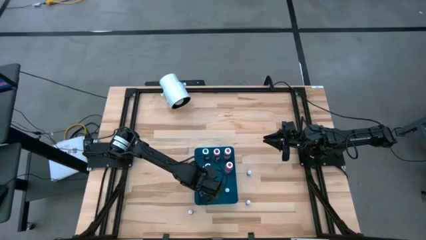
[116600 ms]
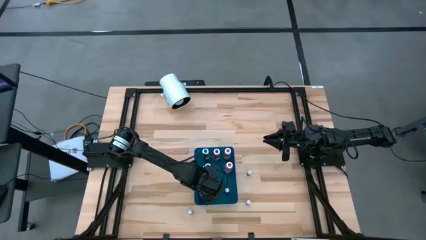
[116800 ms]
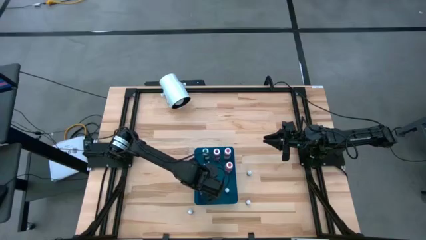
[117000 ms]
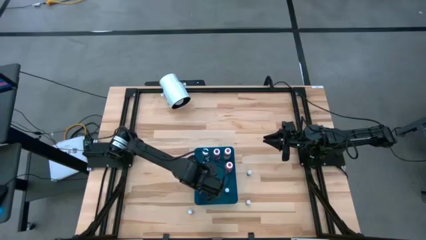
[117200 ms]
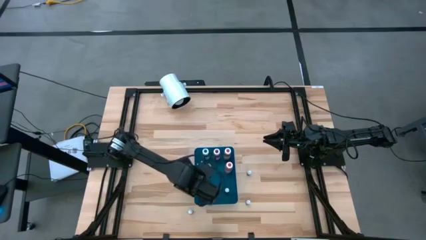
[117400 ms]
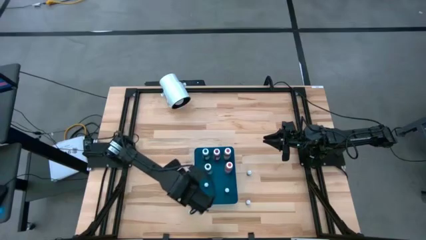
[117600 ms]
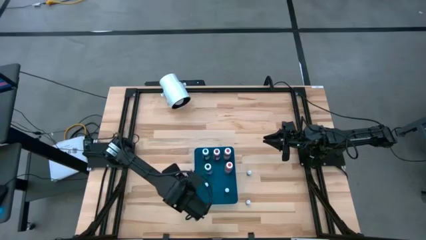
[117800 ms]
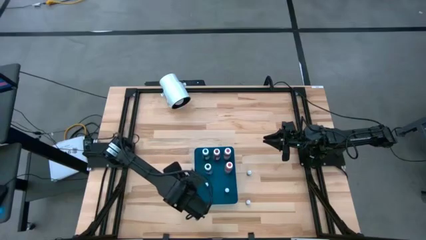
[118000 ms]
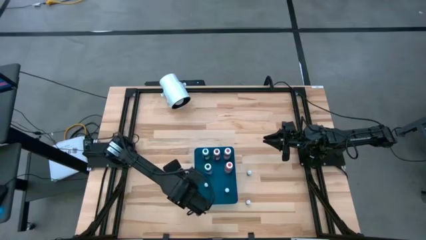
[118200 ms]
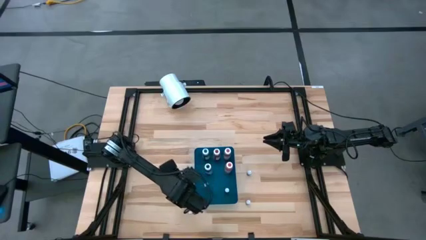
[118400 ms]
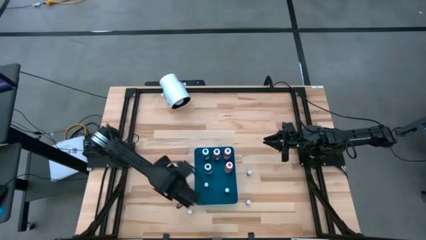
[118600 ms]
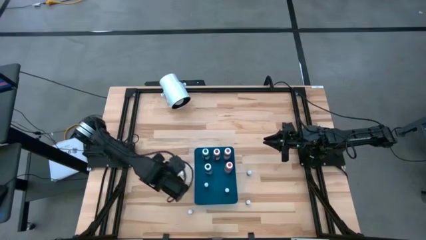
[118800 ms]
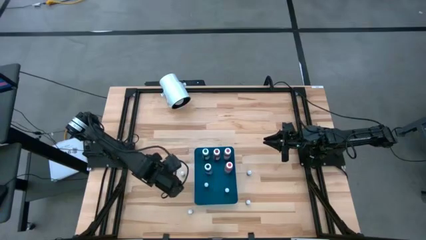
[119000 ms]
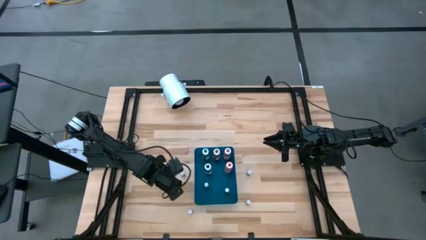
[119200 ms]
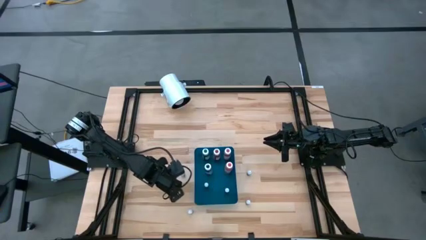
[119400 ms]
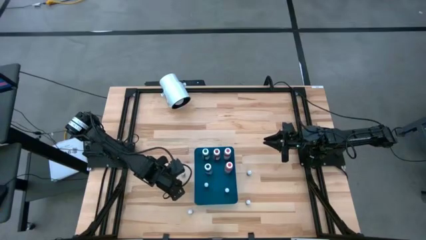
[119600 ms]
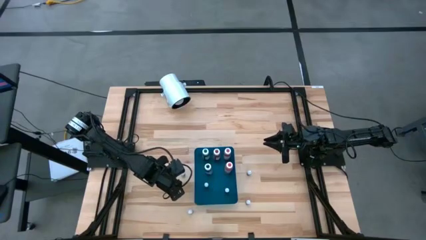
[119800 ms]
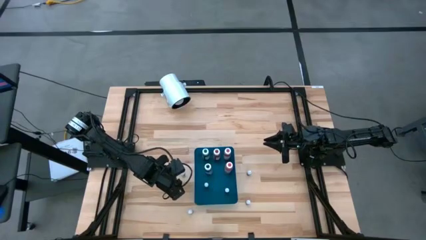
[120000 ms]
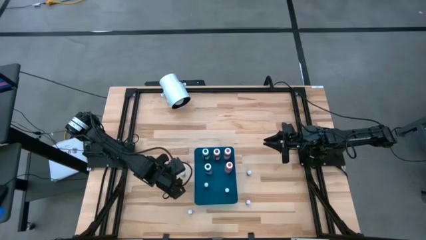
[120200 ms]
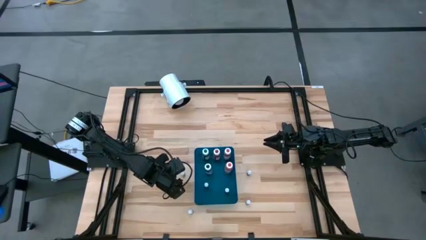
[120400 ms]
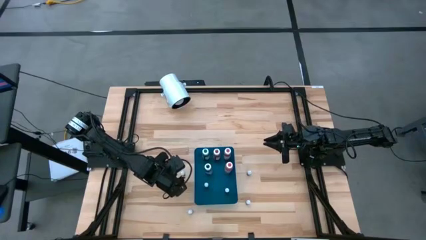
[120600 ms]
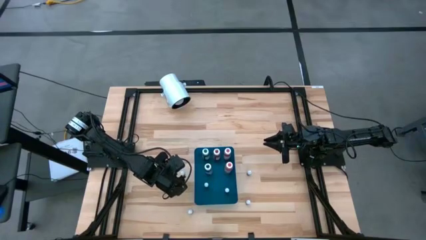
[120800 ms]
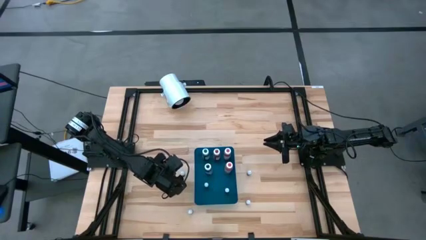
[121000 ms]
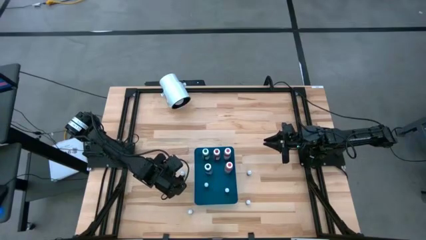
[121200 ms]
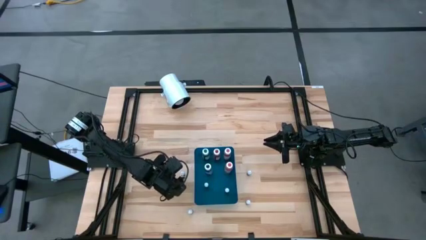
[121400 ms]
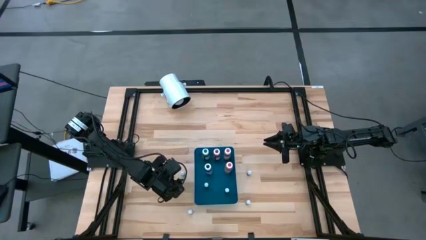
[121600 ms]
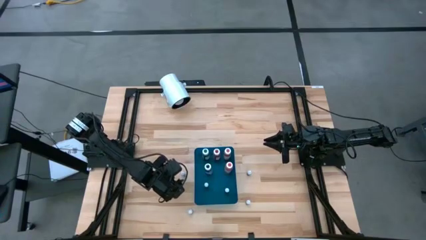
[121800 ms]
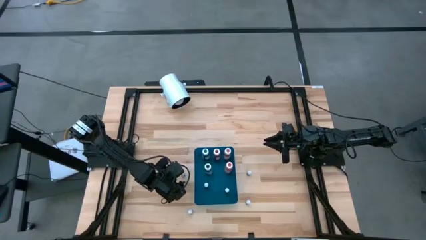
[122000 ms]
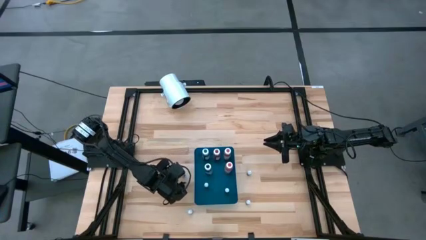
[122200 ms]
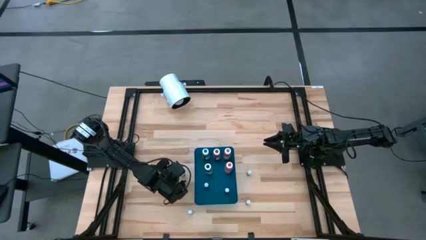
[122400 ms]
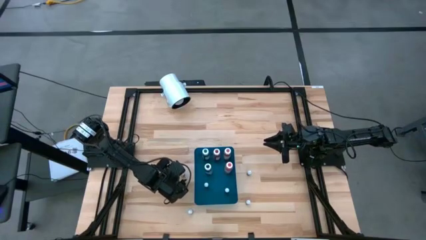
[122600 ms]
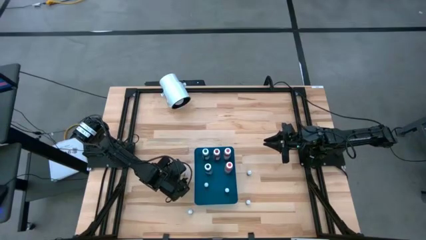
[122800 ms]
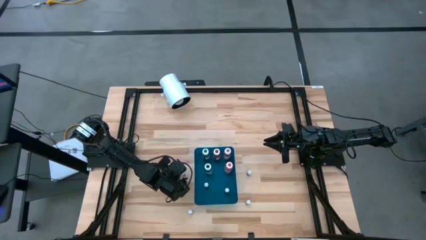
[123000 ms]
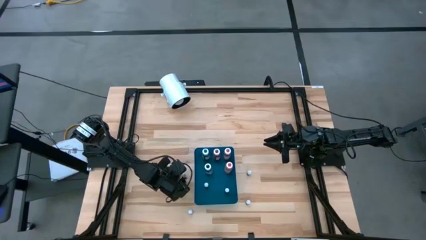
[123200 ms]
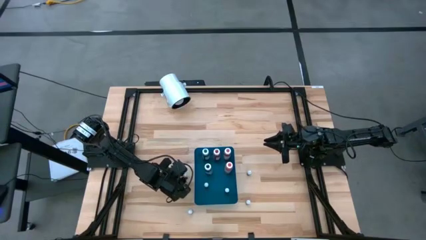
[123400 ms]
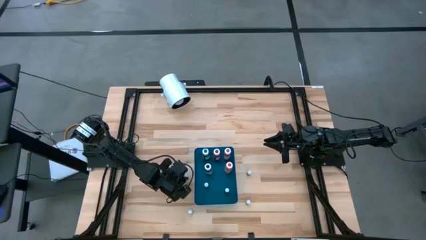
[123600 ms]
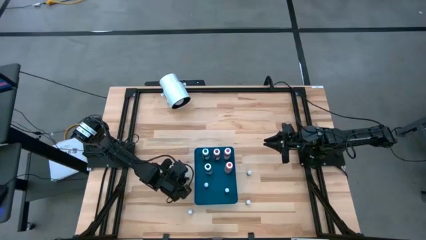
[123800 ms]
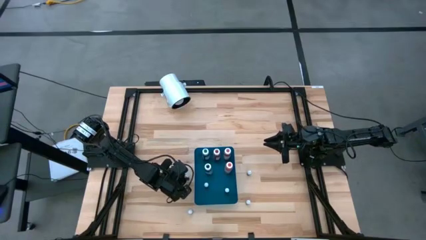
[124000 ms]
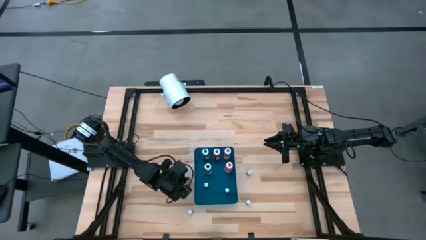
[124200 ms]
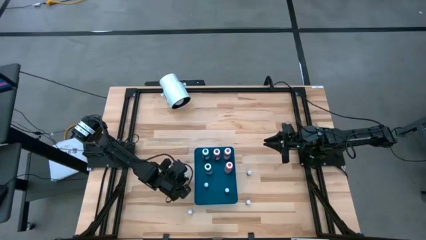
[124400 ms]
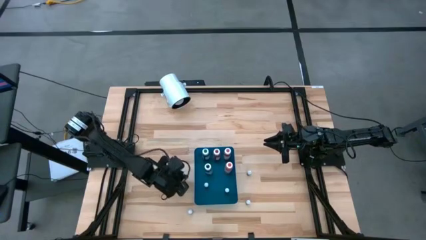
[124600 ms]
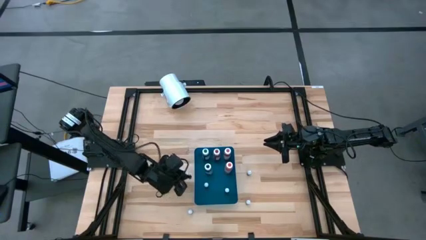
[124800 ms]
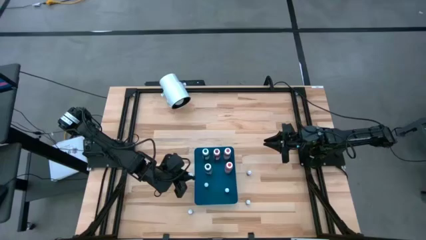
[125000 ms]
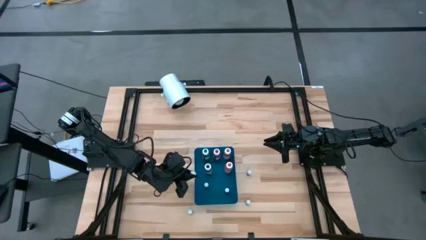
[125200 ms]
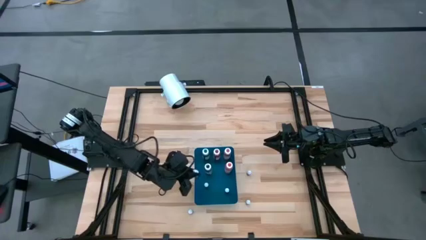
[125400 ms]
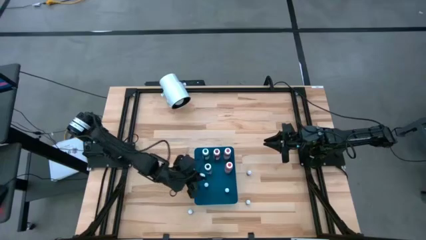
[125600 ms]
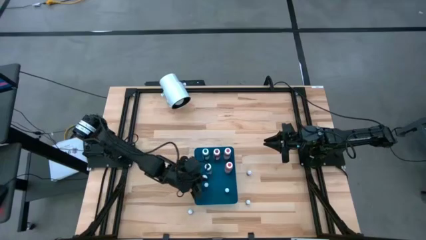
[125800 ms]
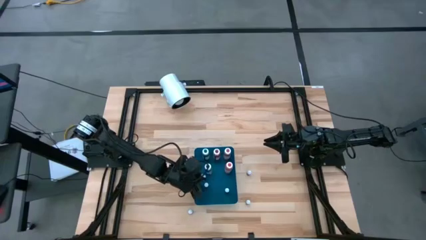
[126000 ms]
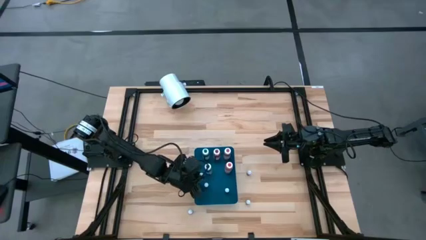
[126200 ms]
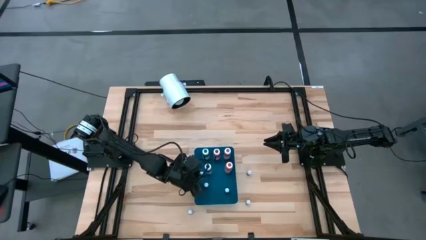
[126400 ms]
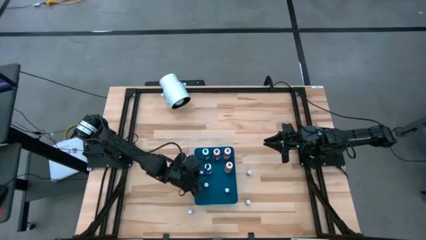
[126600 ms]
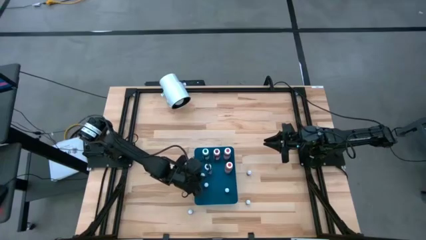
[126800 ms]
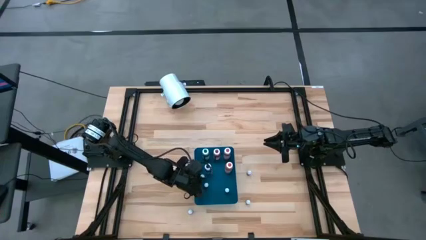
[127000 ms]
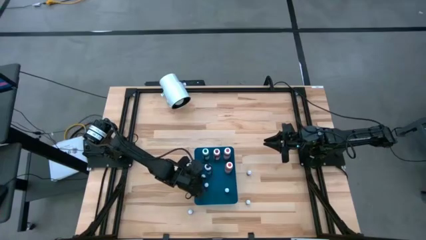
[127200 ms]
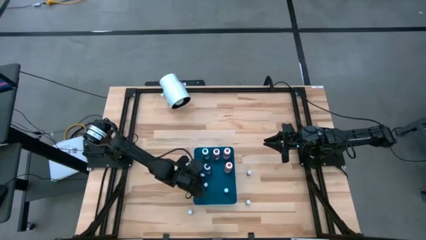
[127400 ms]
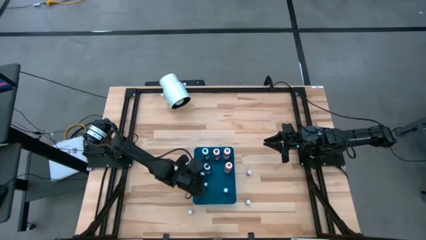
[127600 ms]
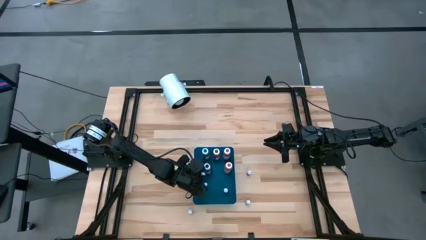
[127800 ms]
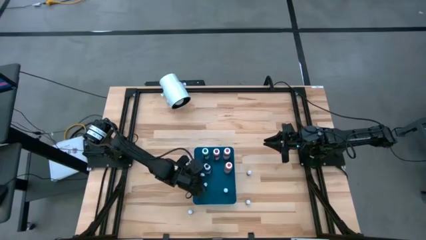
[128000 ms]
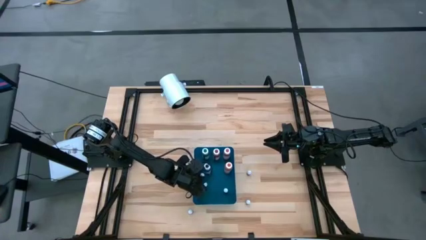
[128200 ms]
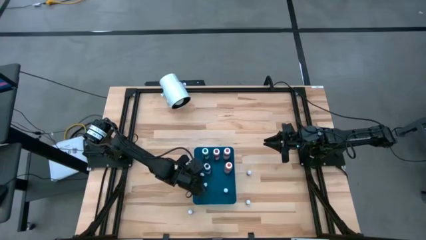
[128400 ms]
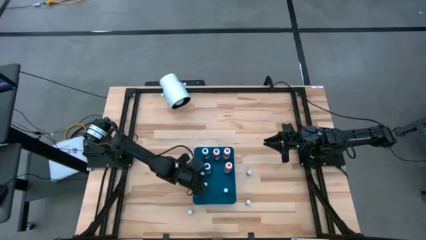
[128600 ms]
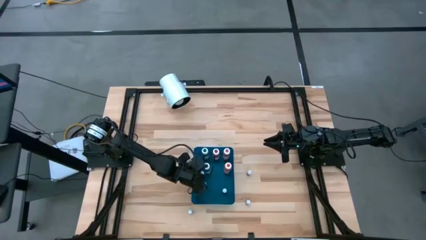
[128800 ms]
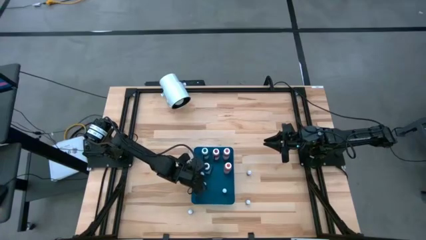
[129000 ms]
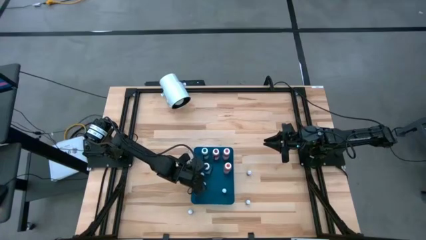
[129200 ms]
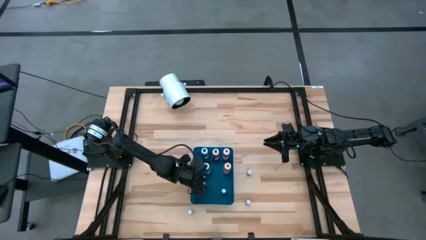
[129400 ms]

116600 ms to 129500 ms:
Task: Pick & Place food coloring
Put the top small black food coloring bottle into the blue container

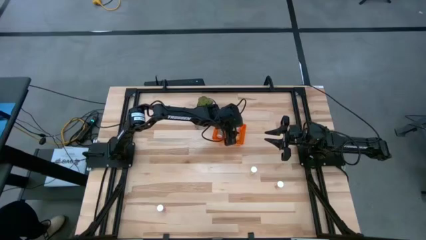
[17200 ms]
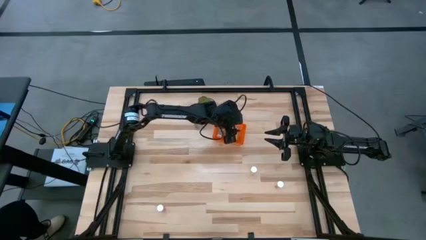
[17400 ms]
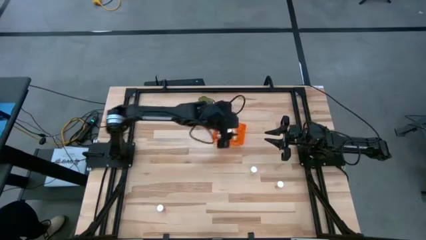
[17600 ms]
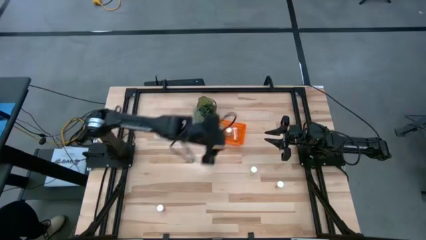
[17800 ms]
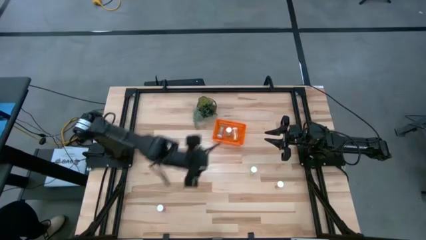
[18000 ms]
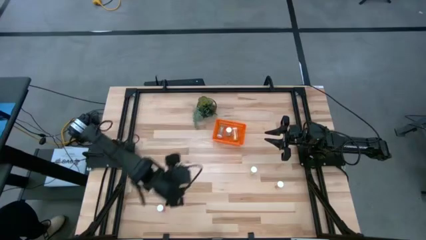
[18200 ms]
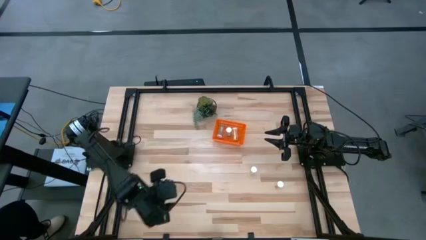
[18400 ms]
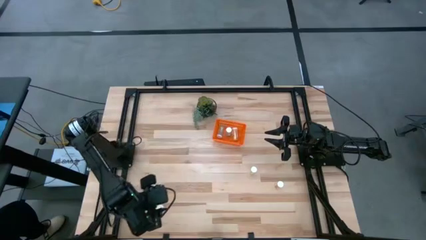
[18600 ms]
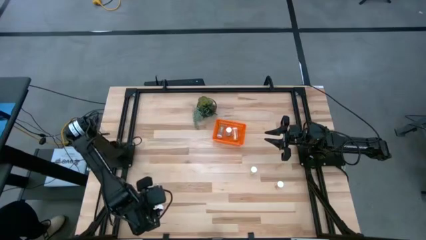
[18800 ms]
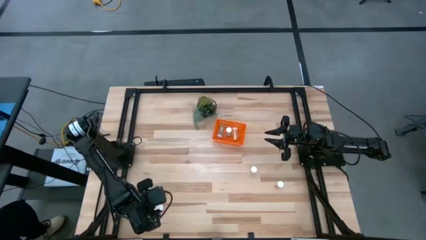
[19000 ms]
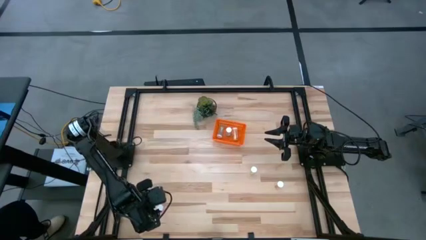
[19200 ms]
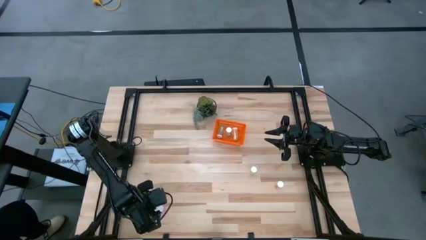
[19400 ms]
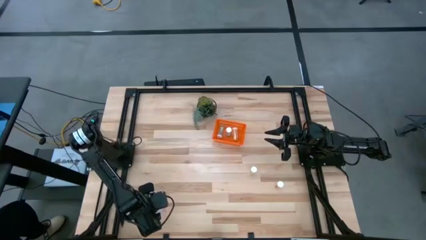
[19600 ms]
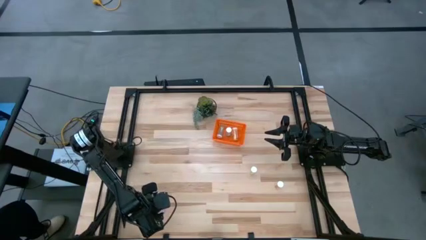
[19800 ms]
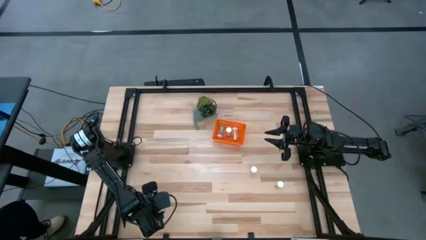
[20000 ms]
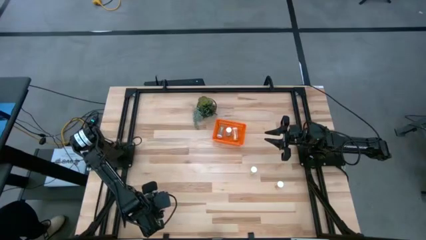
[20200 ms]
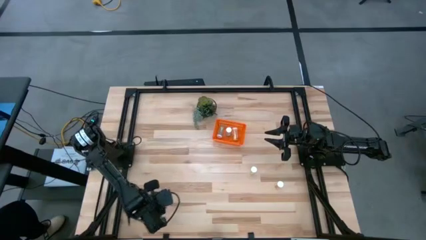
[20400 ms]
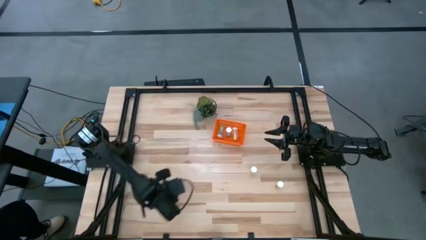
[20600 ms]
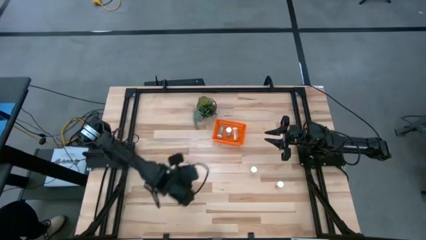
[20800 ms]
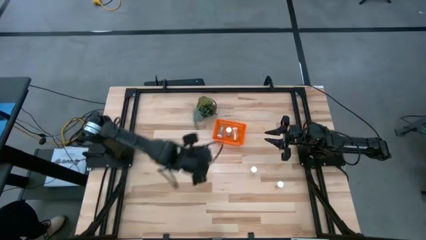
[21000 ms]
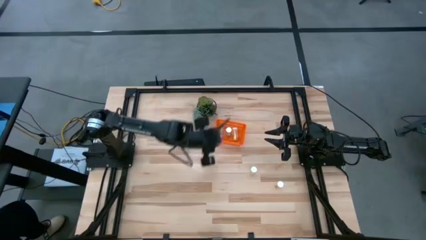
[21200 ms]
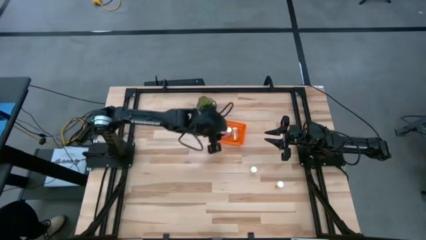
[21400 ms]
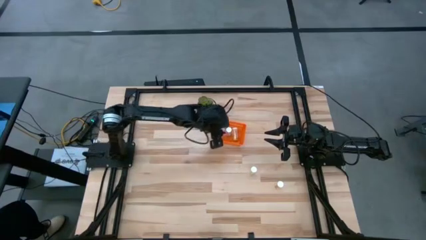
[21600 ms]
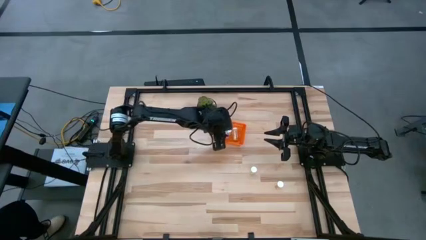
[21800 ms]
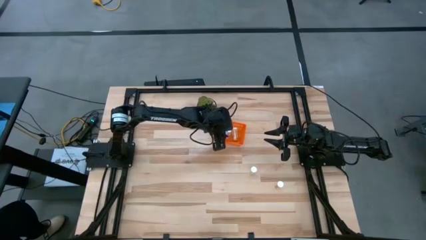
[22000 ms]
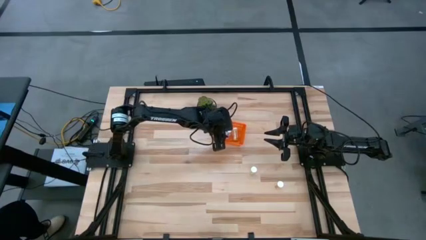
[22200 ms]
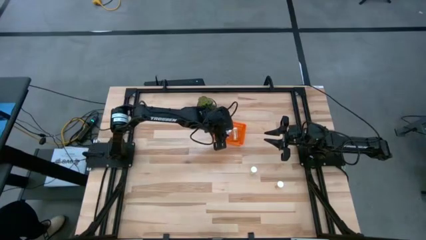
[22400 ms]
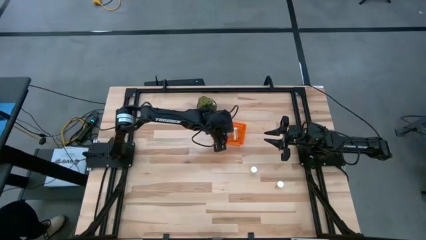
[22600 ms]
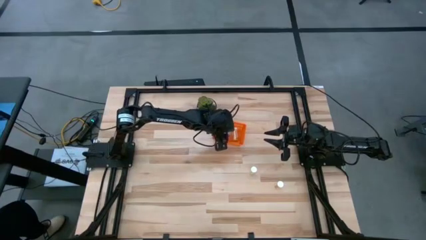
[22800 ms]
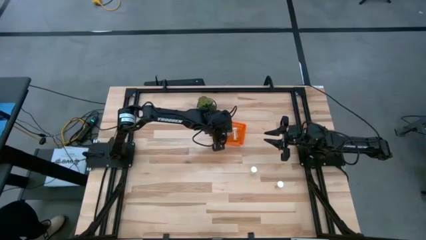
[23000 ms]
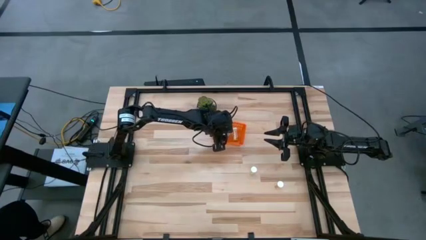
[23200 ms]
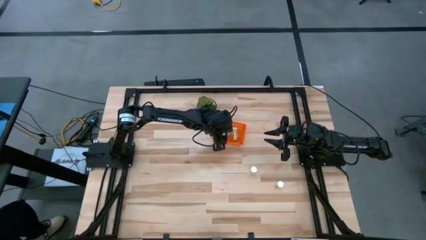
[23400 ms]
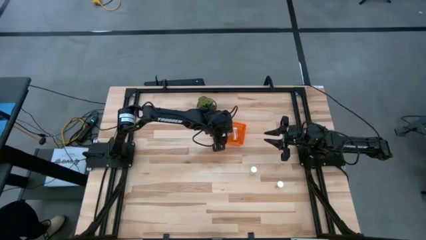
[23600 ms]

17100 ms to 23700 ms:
Task: Pick and place pill bottles into a basket
Put the pink pill bottle into the orange basket
